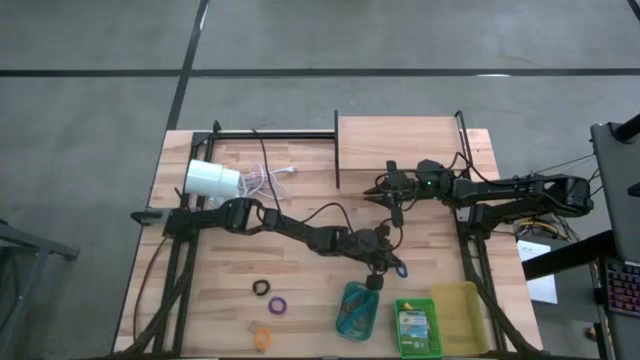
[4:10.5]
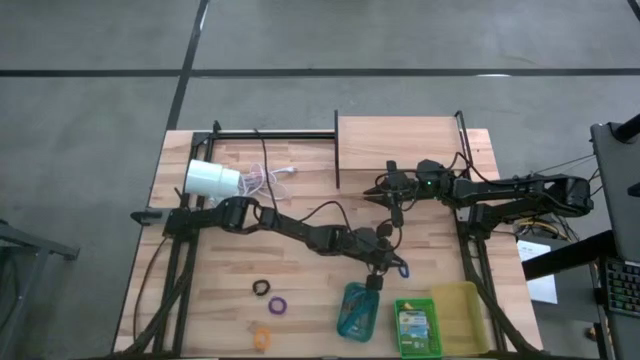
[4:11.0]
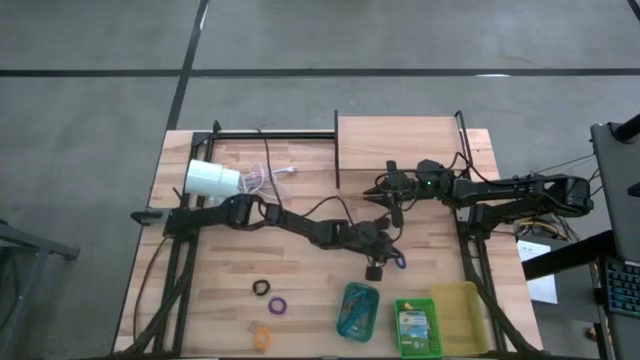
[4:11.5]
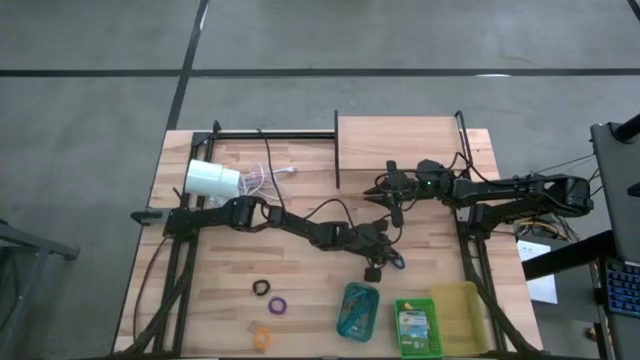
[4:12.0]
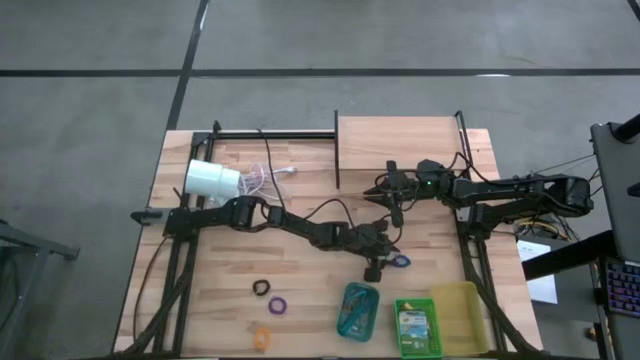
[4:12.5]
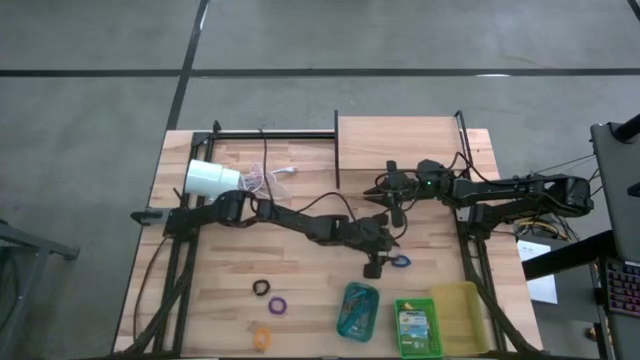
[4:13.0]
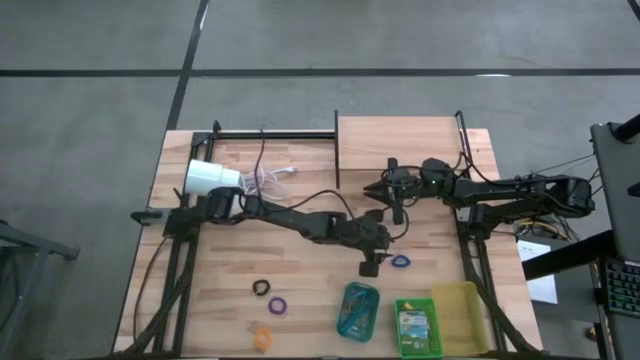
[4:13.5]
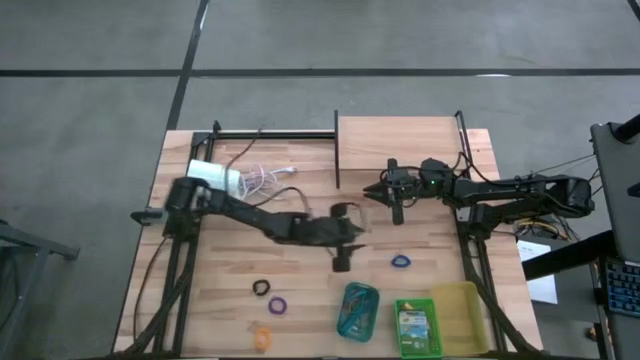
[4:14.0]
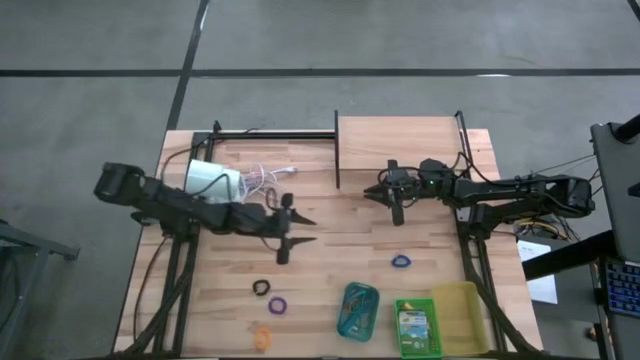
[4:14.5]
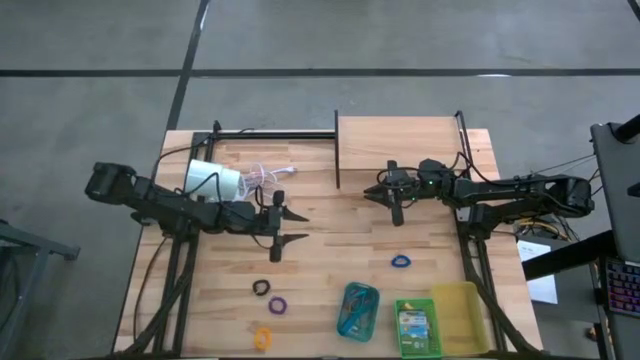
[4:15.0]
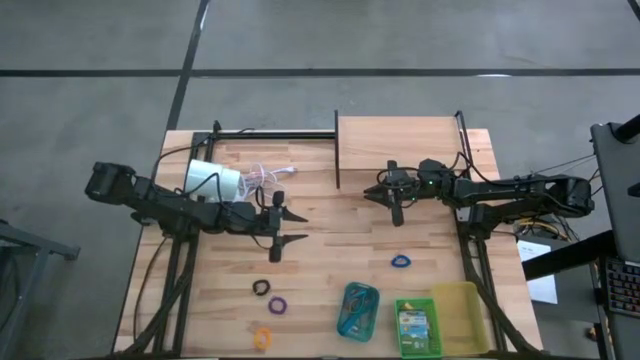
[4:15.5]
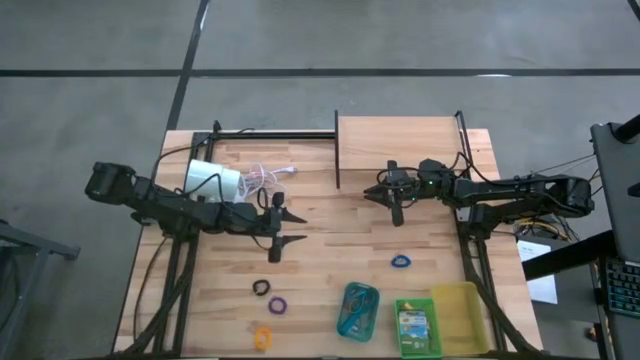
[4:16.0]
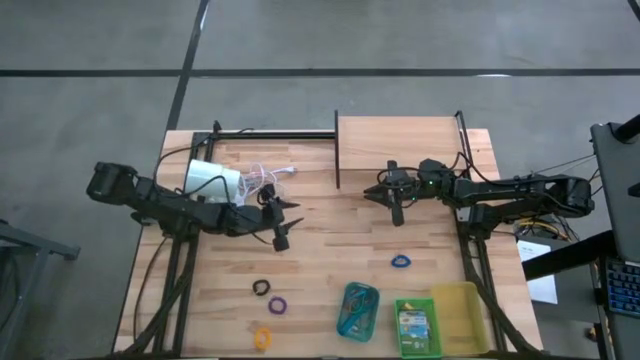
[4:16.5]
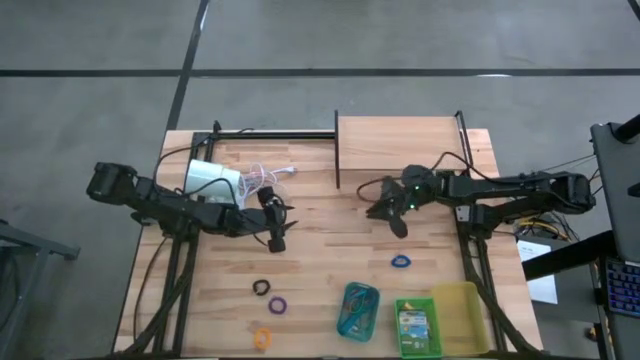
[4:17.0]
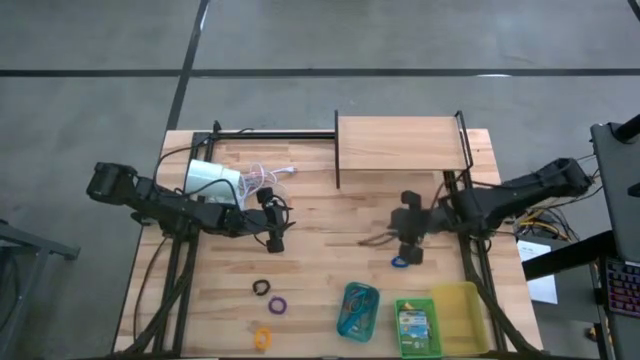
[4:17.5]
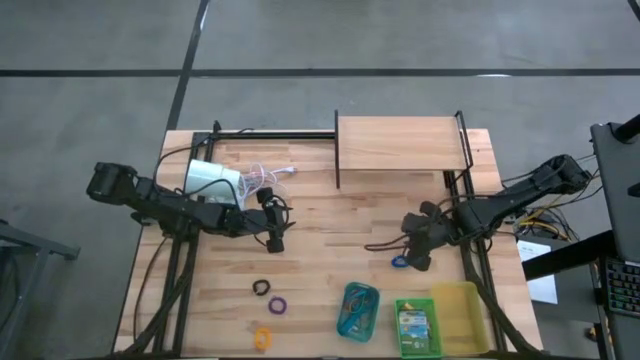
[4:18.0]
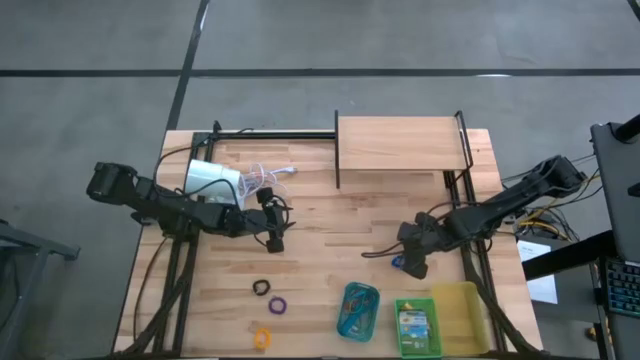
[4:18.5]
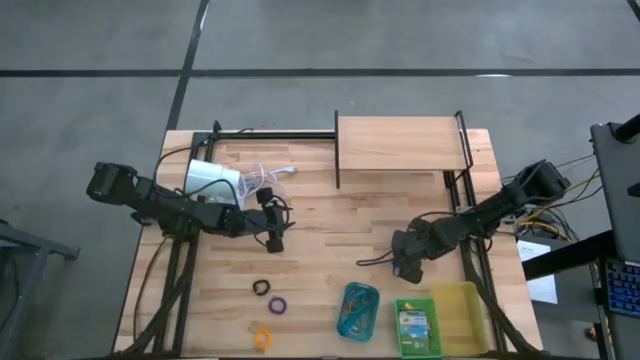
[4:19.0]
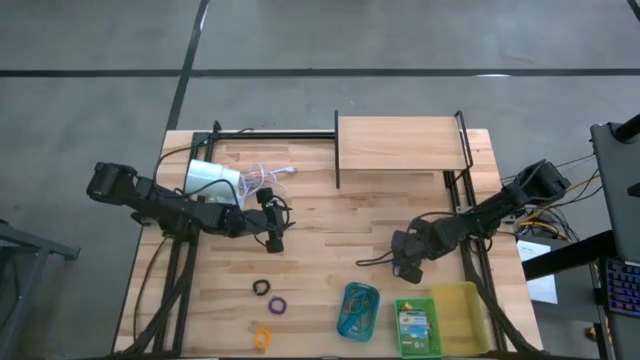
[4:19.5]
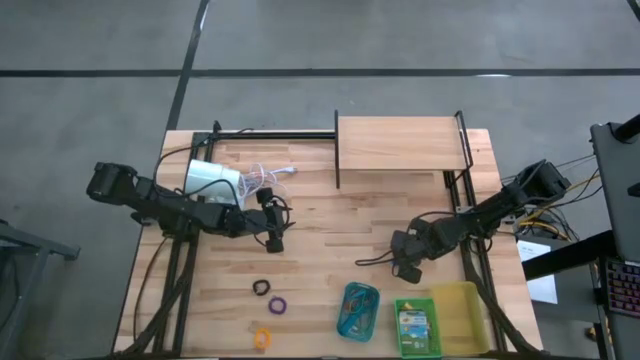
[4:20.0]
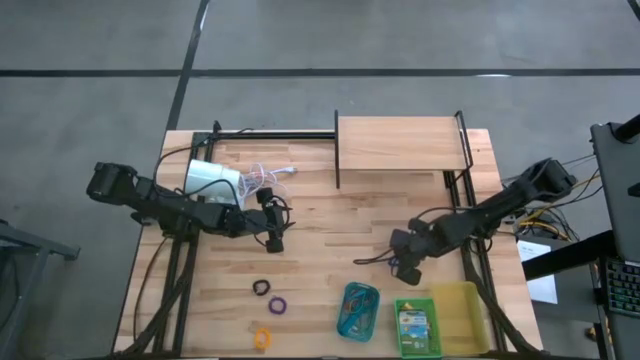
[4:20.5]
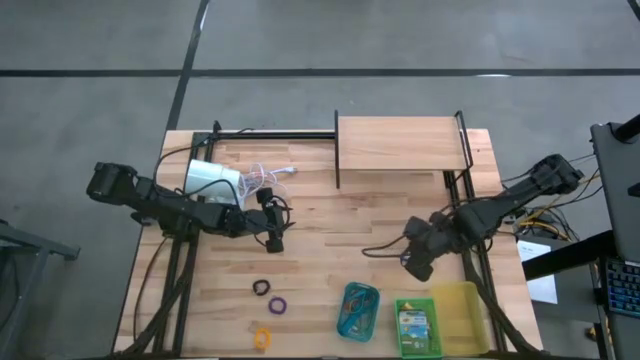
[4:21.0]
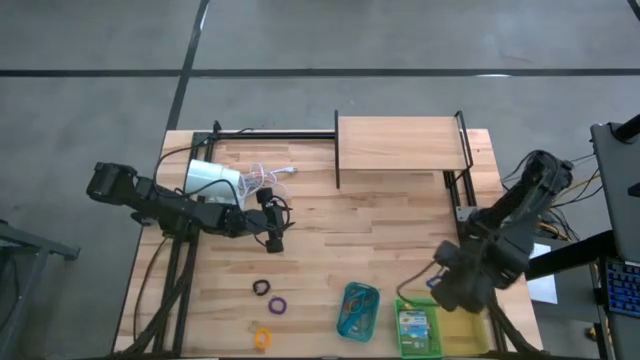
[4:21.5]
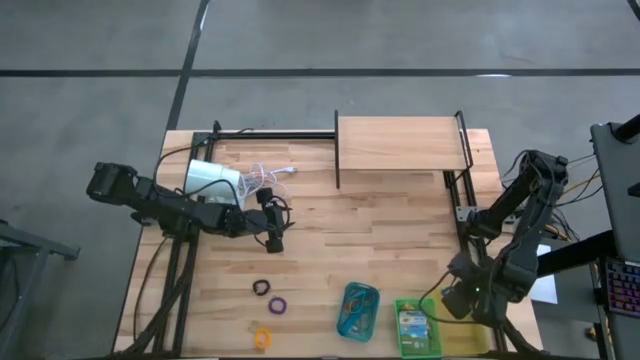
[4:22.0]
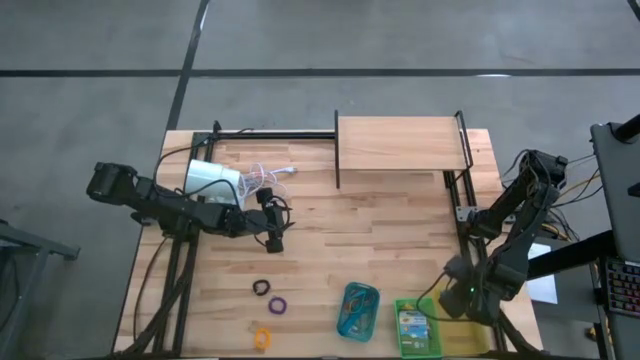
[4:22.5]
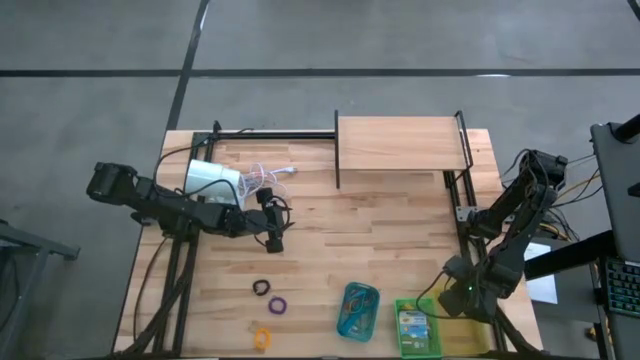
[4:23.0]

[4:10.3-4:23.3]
Task: Pick & Place Office Desk Supplies
Put the blue spring rubberband into the yellow bin

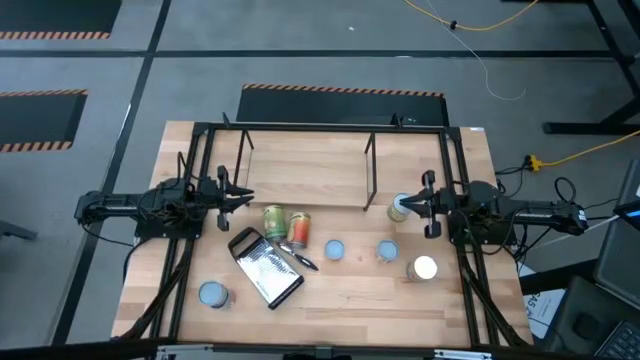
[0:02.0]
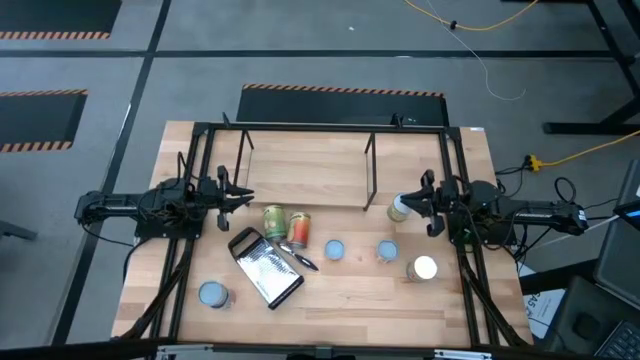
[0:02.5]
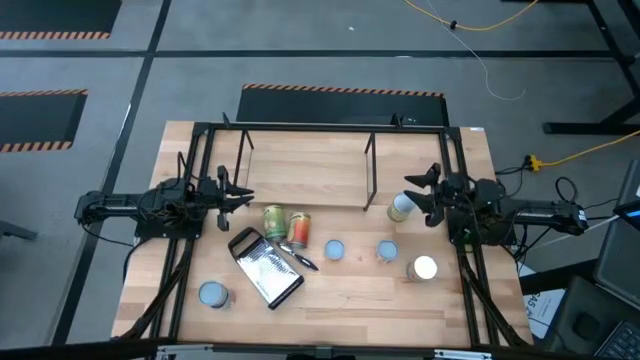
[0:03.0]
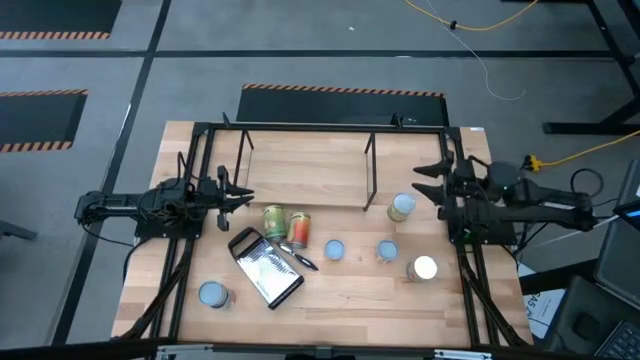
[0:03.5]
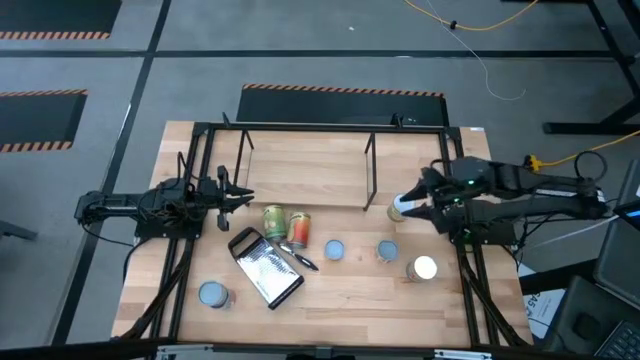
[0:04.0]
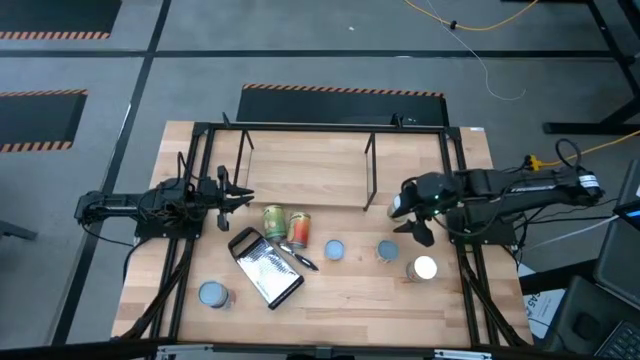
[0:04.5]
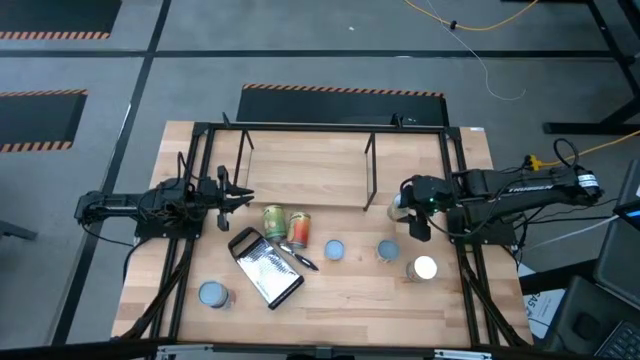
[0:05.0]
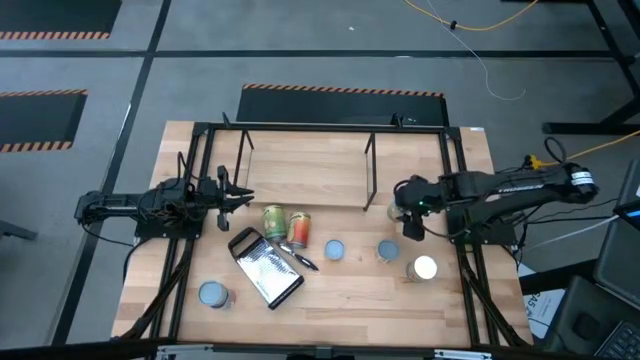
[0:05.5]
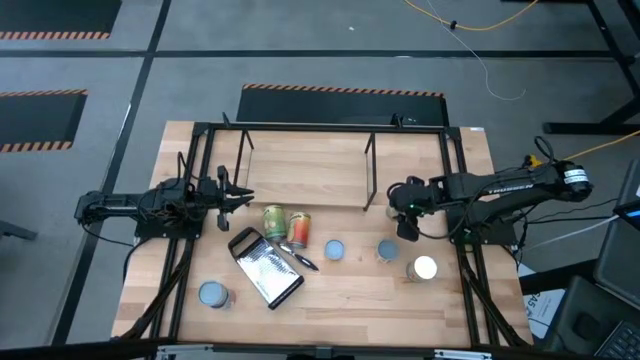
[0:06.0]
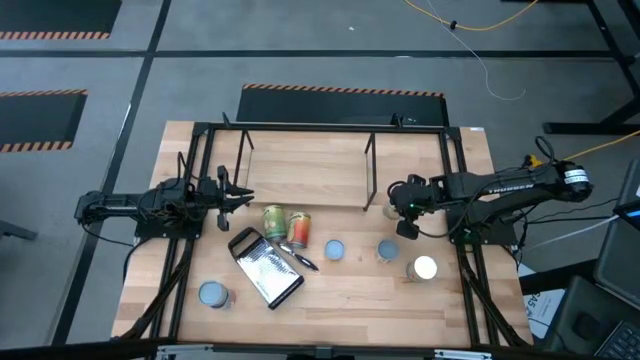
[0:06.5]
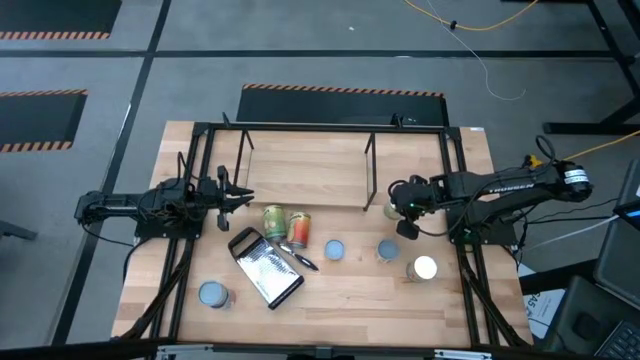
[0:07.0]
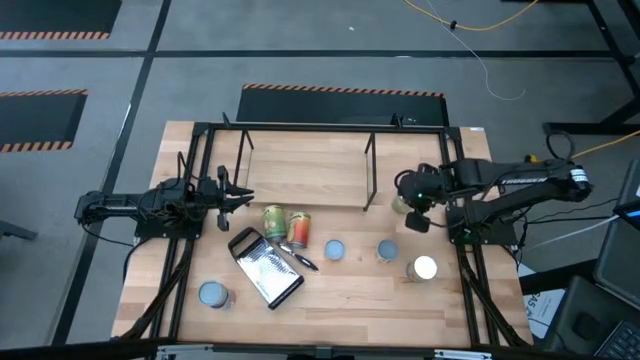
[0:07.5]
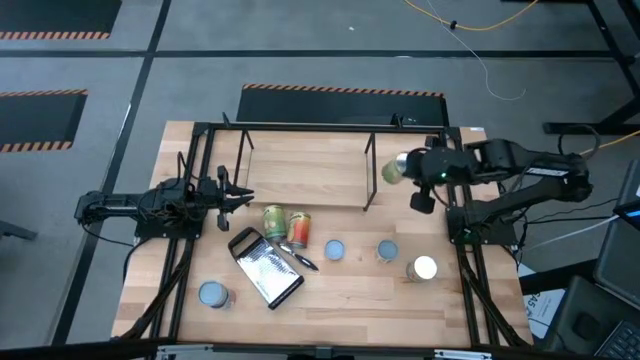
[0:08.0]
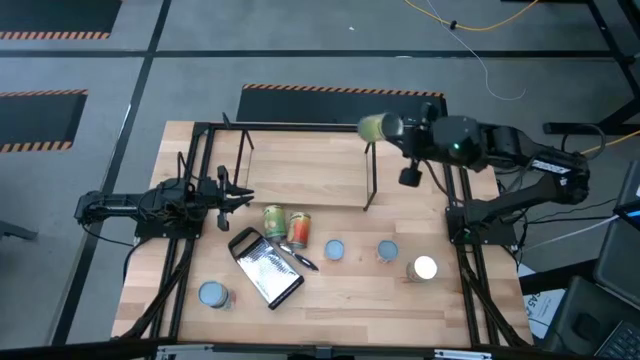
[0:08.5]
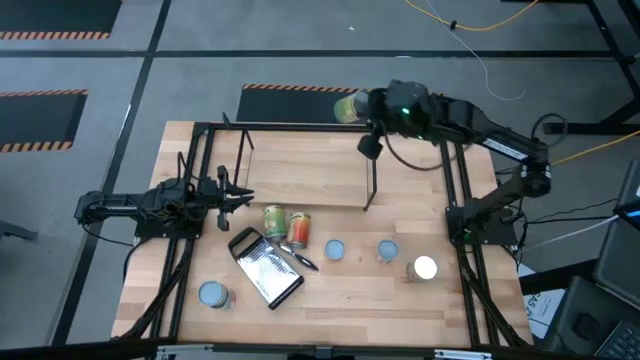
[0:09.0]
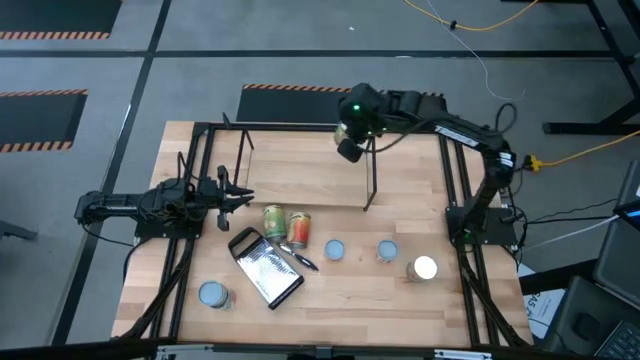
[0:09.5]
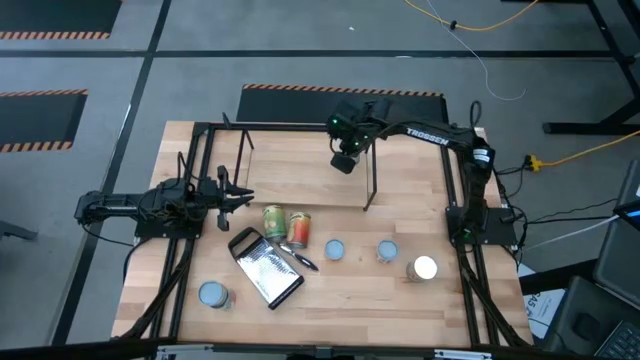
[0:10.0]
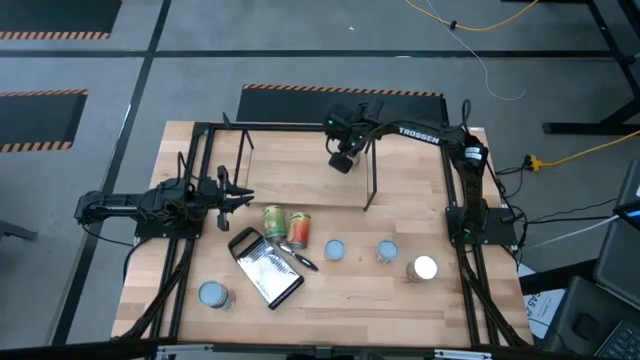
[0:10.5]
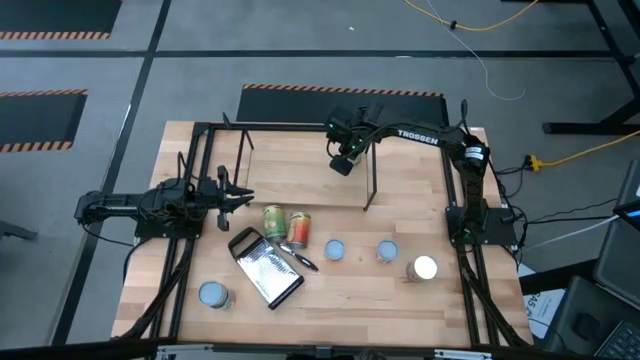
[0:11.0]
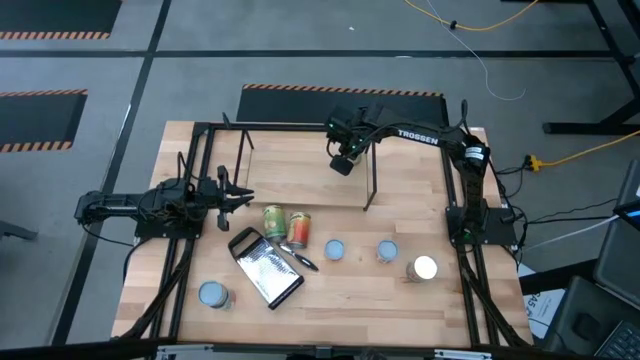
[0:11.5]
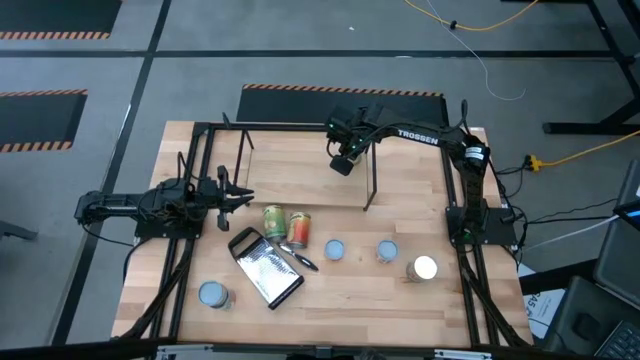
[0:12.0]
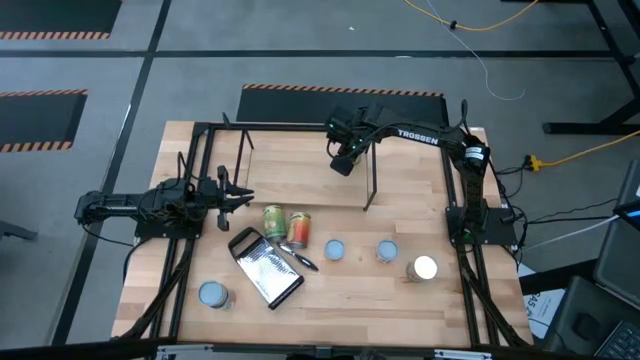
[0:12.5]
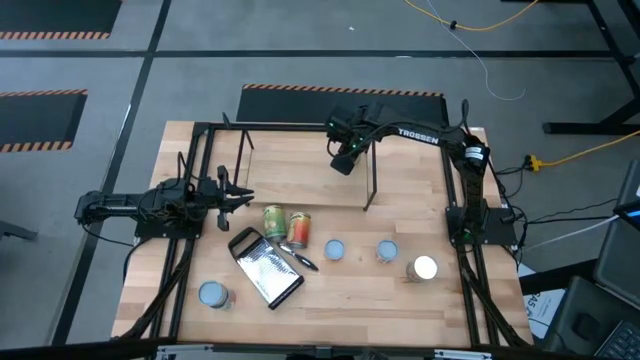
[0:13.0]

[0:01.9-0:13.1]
Task: Pick and place cans onto a shelf
Put the canned orange on the shelf
